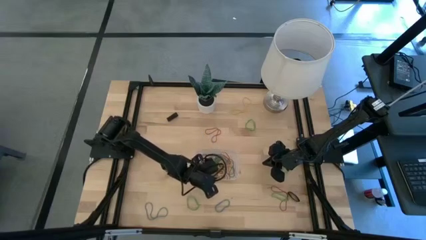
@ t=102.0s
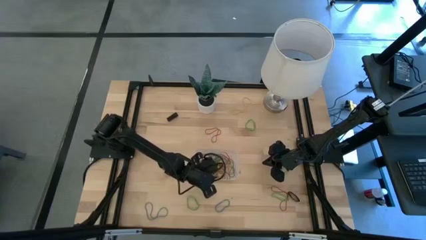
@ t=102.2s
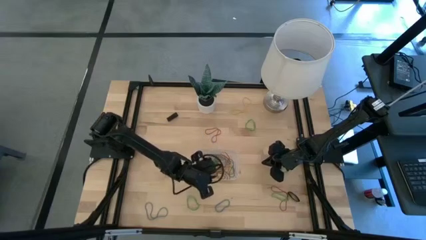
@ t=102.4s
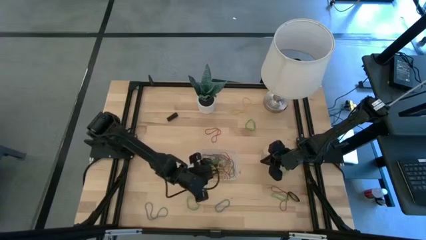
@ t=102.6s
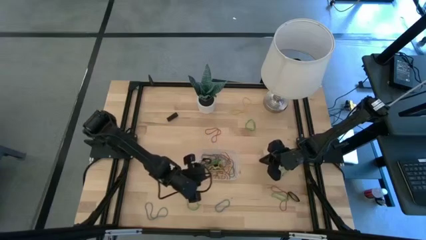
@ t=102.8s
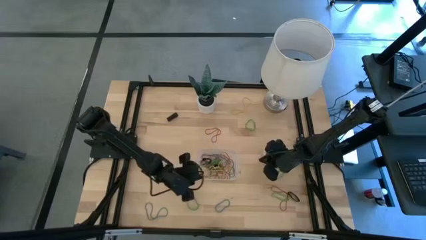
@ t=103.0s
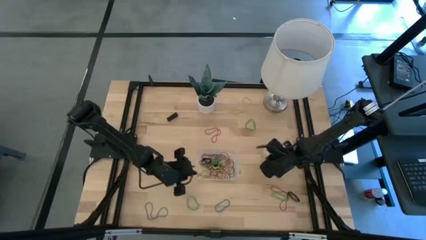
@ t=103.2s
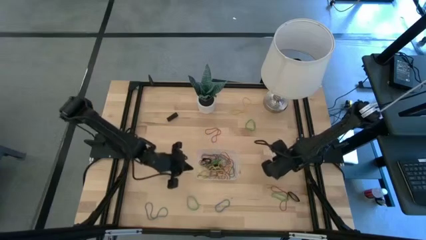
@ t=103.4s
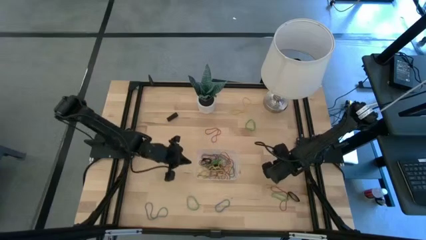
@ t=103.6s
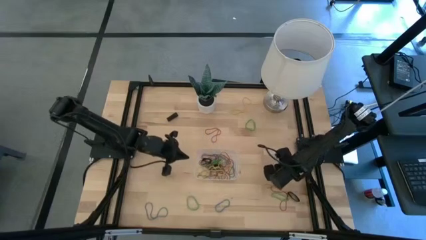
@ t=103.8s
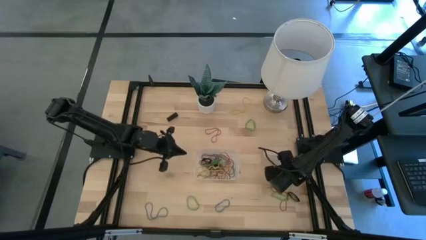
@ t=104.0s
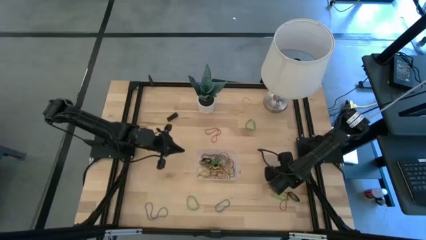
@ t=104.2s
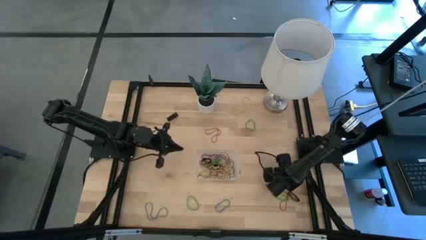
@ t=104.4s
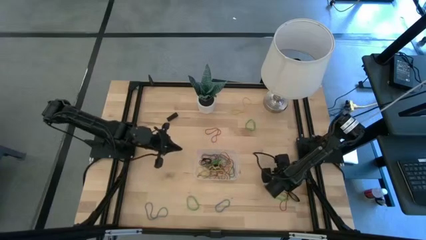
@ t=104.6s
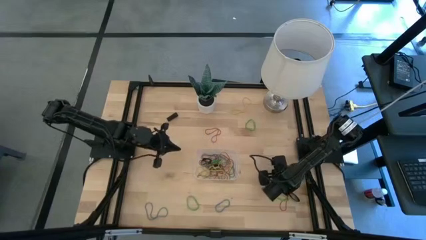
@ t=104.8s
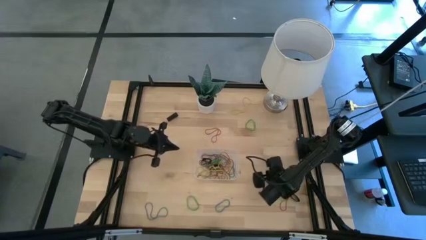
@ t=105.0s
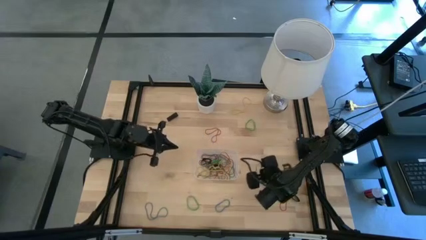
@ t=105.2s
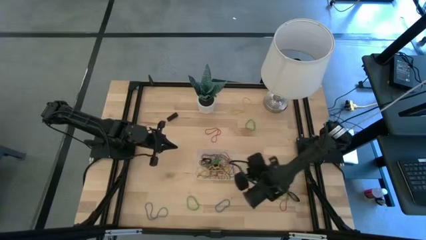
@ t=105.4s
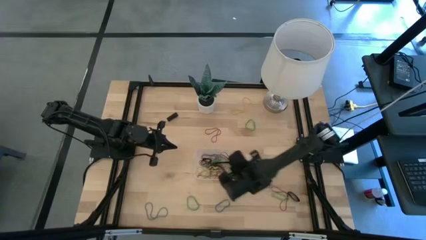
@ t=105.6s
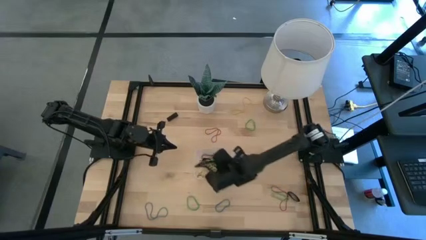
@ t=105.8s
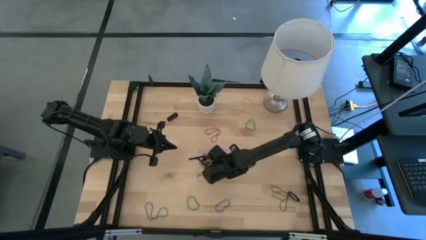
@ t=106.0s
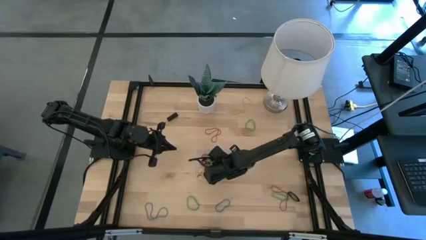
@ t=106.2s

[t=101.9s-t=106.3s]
Task: Pick and place rubber bands into bin
Put the green rubber band into the transparent bin

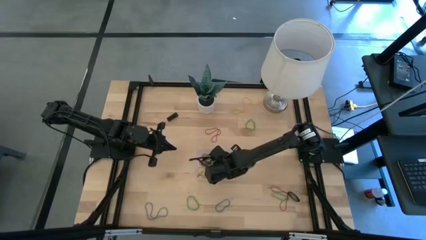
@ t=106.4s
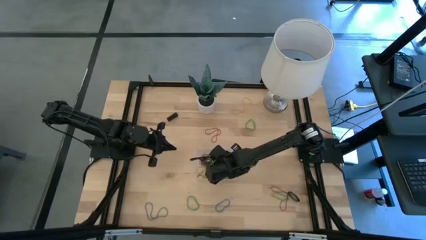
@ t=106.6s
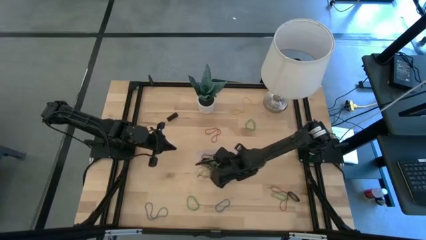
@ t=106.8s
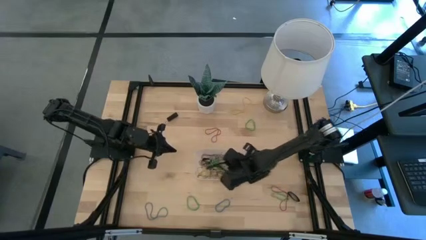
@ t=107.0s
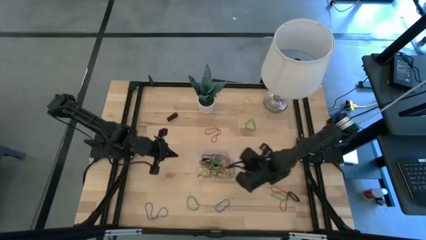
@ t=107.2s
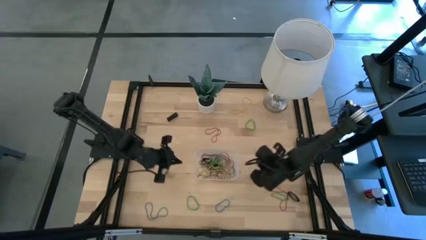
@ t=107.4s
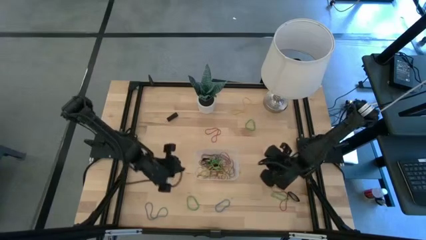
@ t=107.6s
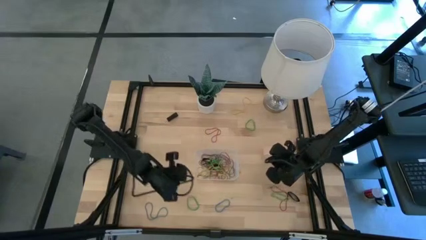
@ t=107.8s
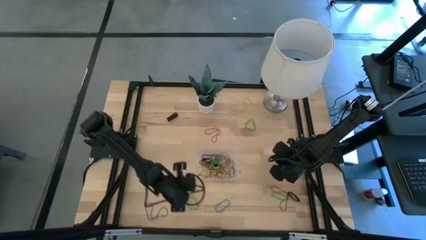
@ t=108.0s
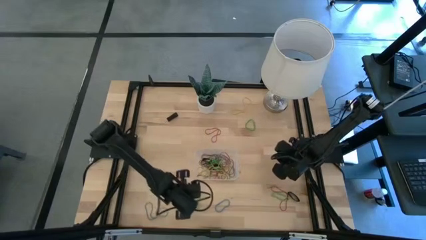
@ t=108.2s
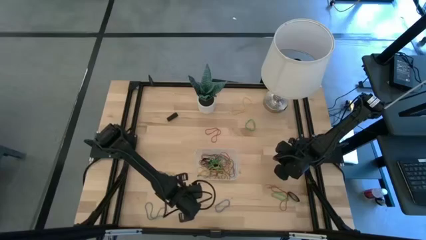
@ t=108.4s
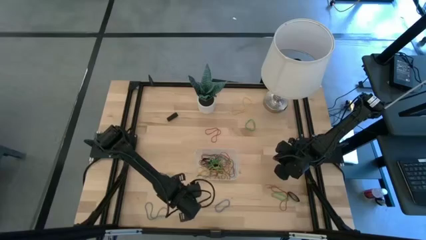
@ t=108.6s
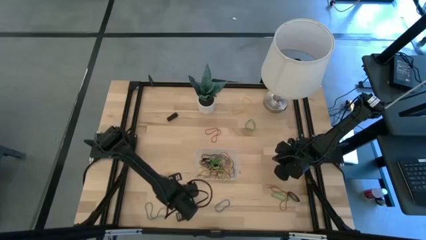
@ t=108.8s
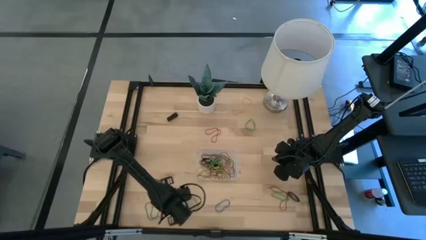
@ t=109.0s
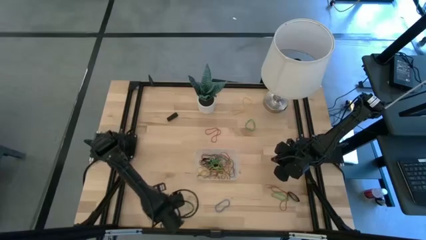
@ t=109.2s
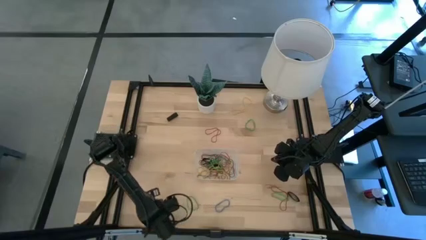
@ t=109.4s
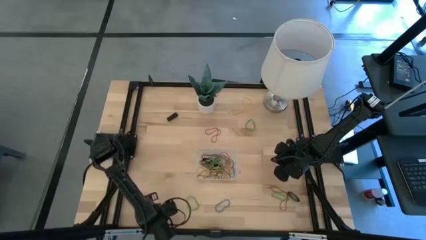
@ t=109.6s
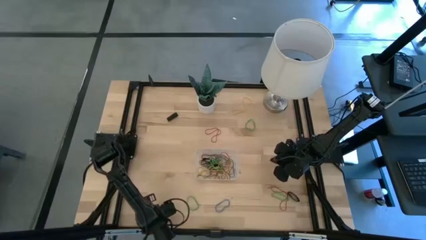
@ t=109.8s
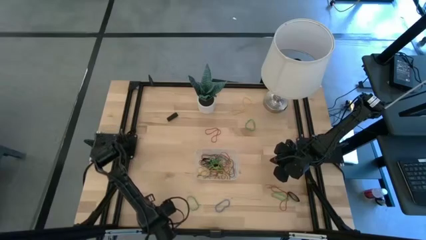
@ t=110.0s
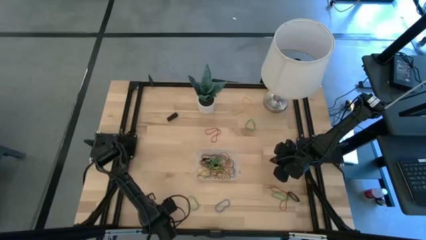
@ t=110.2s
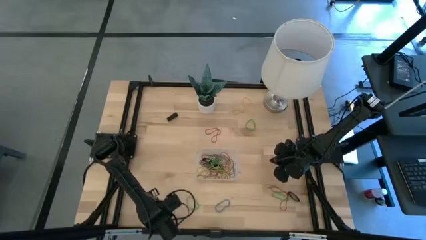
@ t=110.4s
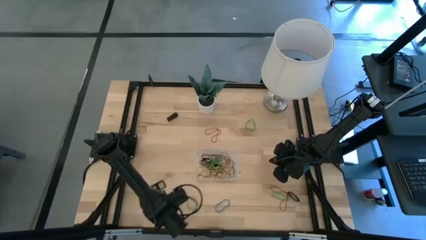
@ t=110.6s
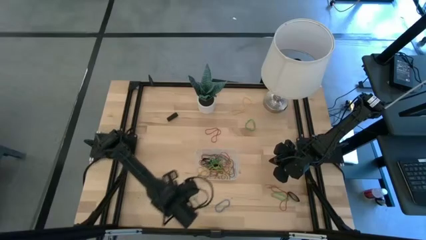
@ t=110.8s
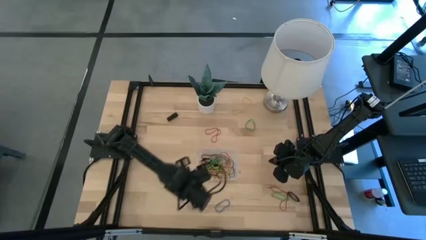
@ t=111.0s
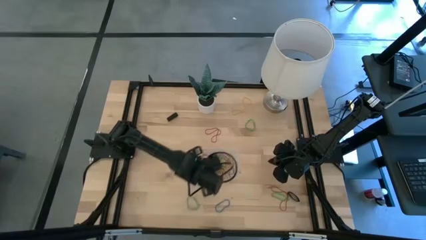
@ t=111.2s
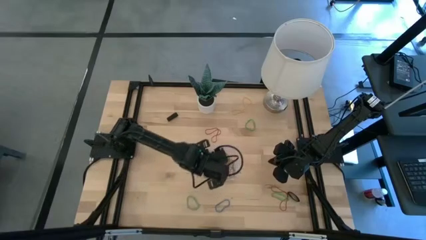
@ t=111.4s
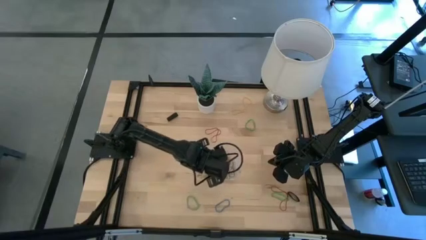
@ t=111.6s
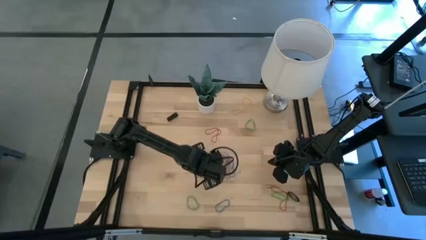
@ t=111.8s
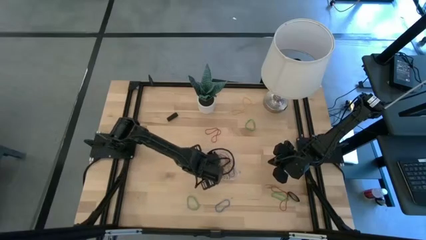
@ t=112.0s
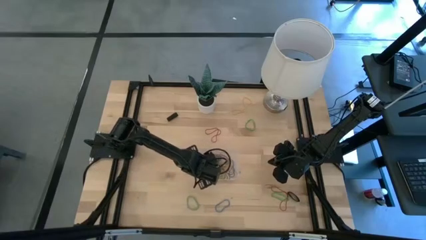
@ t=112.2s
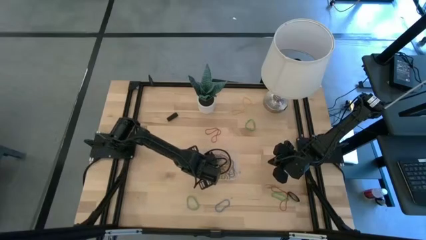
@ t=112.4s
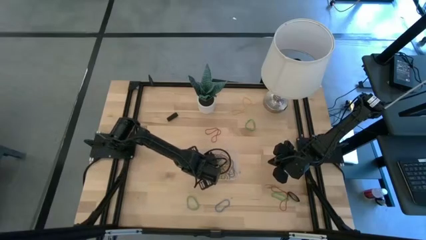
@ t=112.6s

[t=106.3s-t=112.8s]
Put the left blue rubber band into the transparent bin

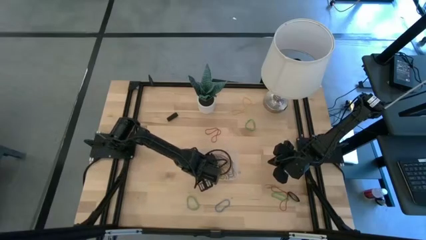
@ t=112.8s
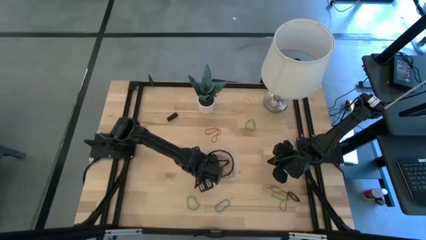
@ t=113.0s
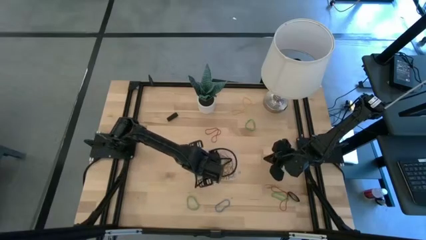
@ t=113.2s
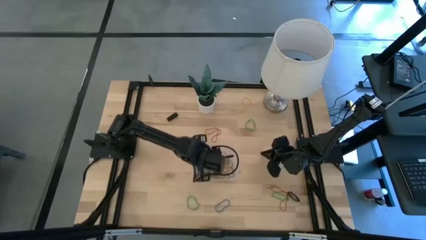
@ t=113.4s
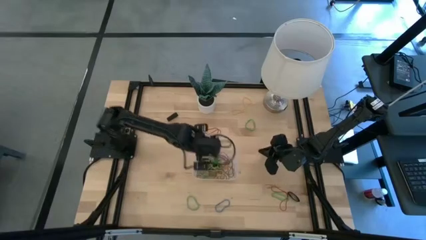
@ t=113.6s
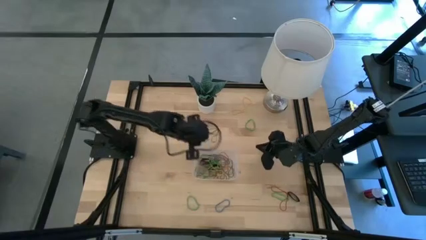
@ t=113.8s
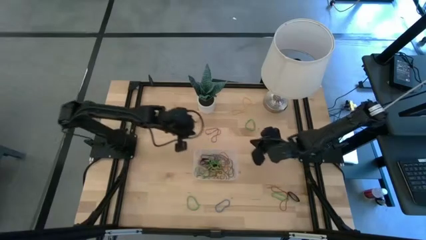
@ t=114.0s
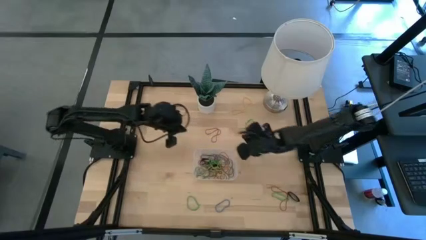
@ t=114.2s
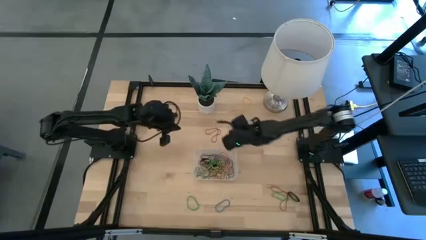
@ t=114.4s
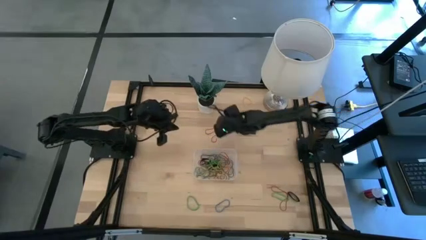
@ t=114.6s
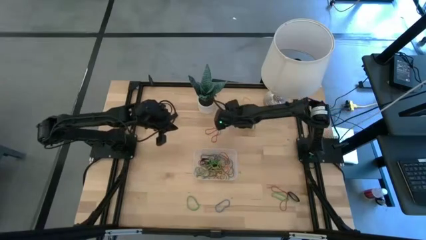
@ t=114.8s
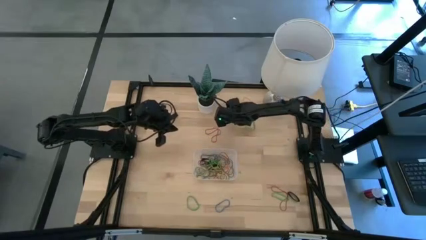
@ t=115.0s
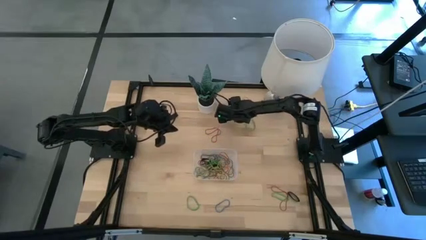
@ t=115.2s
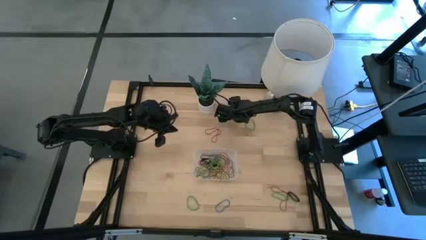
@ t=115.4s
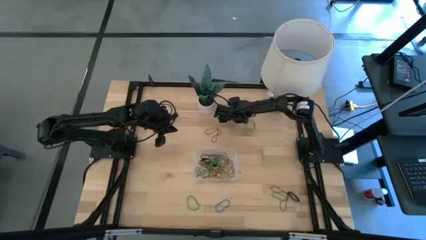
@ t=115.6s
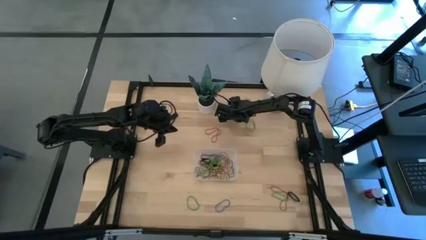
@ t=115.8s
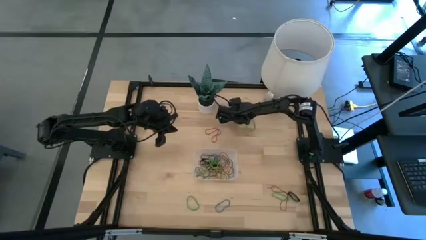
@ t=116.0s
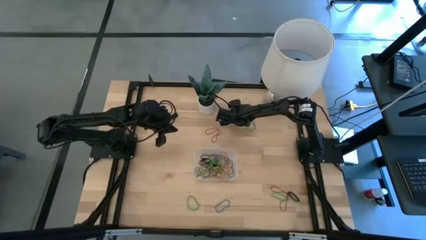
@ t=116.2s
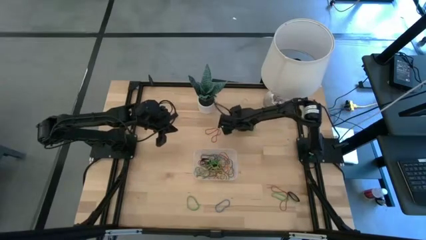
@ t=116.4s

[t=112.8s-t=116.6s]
Put the yellow rubber band into the transparent bin

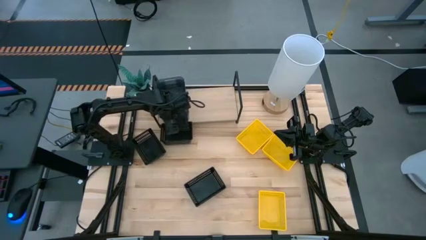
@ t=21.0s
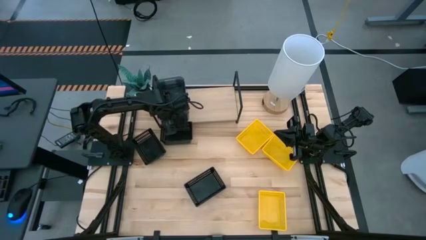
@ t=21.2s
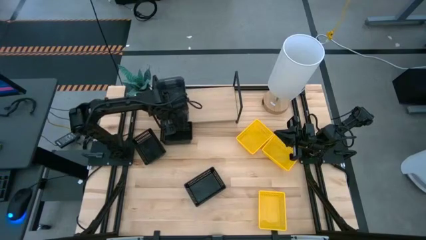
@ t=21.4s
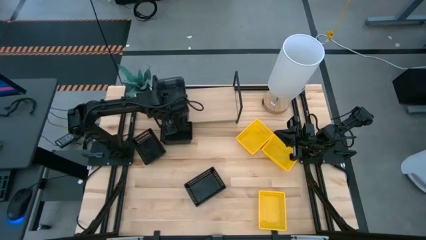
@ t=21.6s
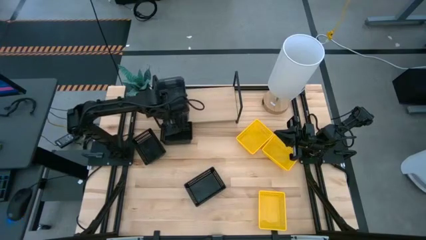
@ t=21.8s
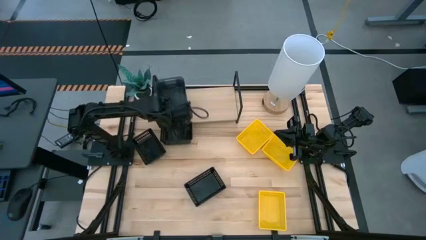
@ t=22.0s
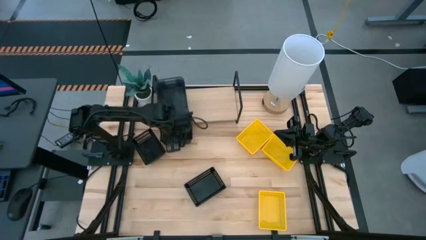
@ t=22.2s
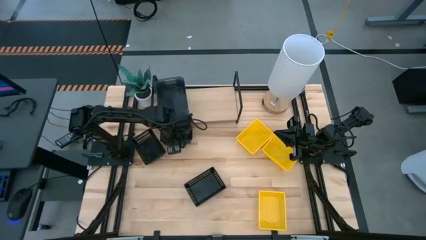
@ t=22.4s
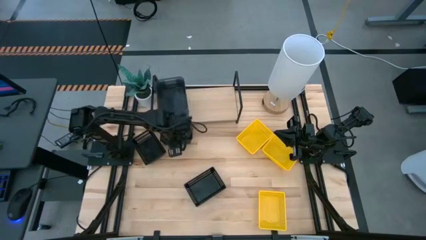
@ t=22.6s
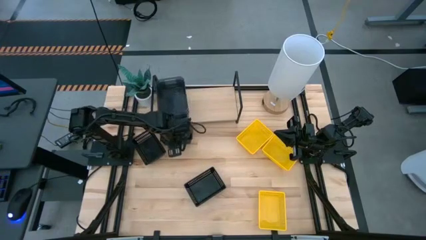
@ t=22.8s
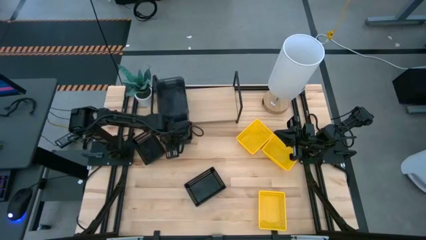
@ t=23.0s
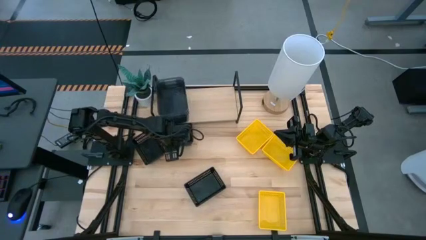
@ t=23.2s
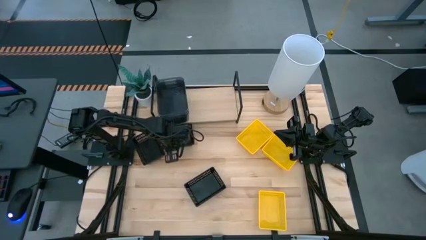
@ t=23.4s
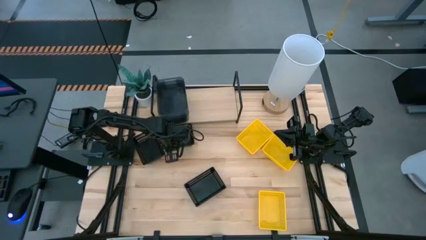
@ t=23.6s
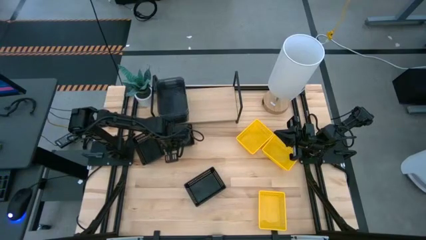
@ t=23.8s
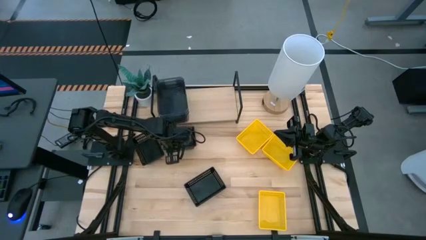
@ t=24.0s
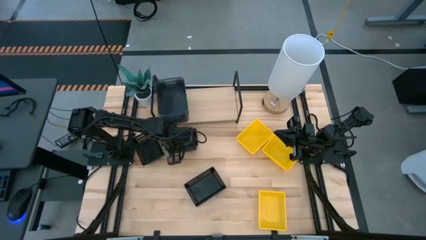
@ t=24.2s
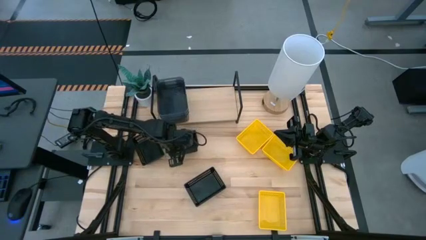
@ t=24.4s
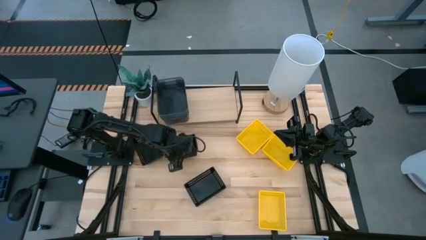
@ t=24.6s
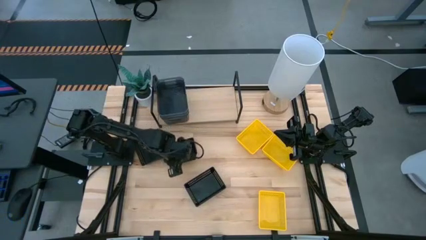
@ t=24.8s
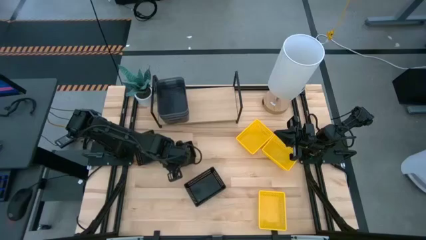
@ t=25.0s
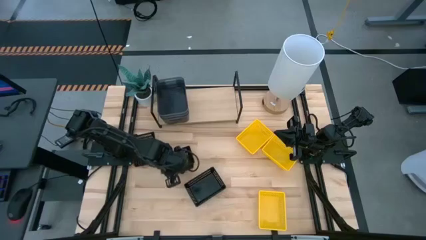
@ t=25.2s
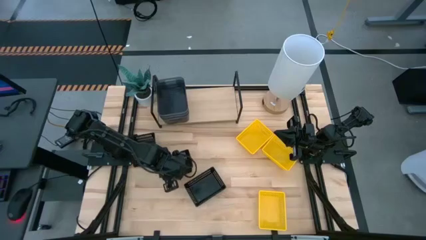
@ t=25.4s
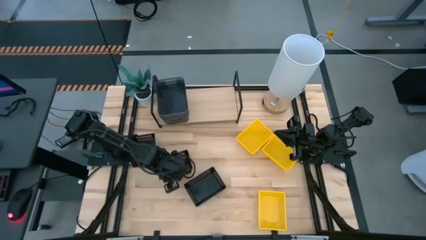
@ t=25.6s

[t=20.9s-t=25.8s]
Task: Stack baskets on shelf by color
Adjust the top right black basket
